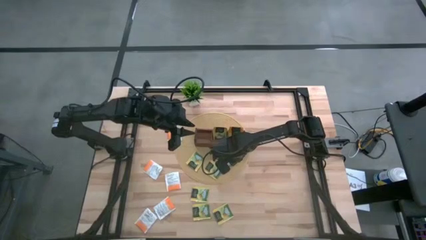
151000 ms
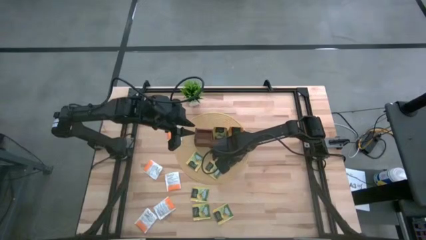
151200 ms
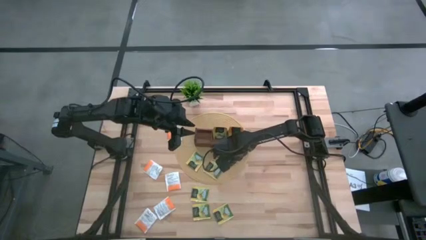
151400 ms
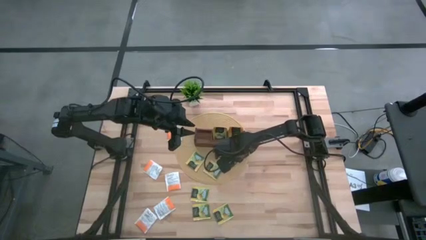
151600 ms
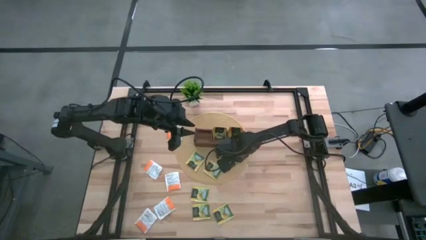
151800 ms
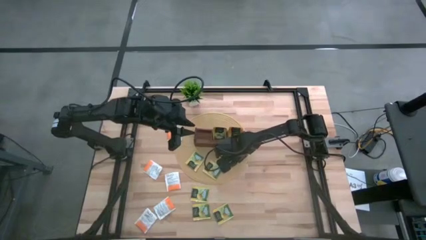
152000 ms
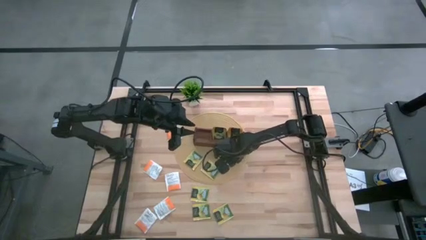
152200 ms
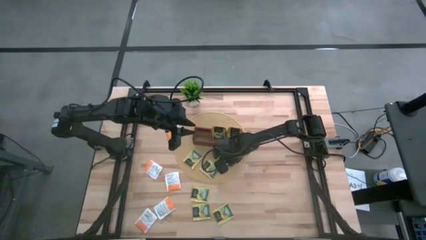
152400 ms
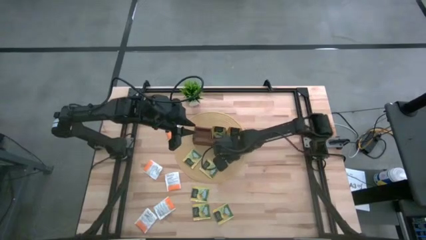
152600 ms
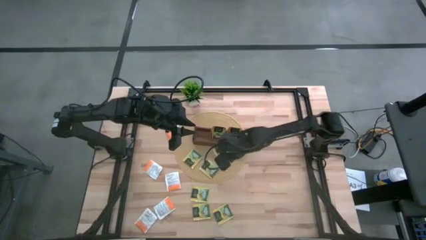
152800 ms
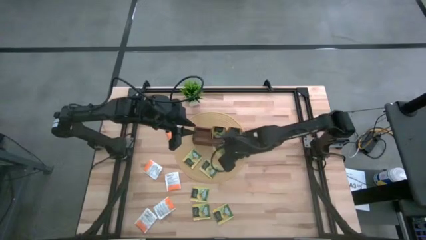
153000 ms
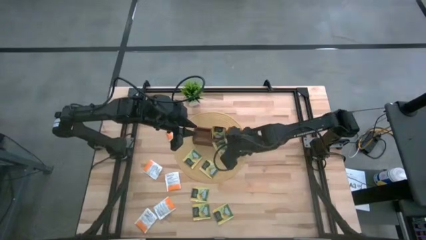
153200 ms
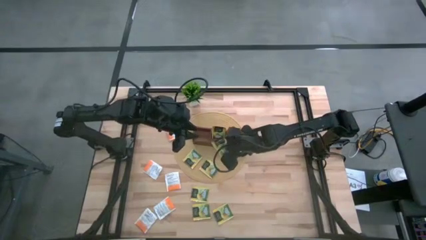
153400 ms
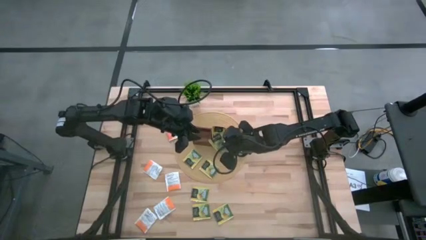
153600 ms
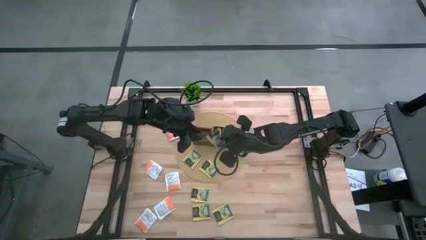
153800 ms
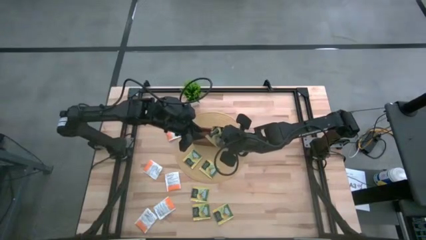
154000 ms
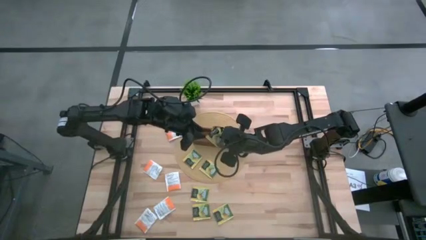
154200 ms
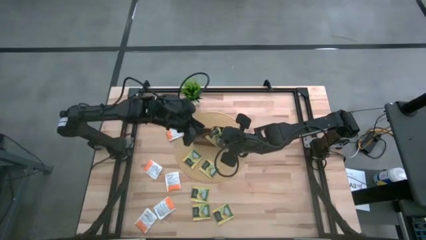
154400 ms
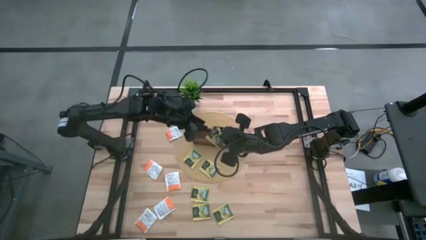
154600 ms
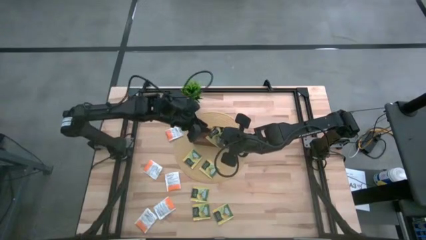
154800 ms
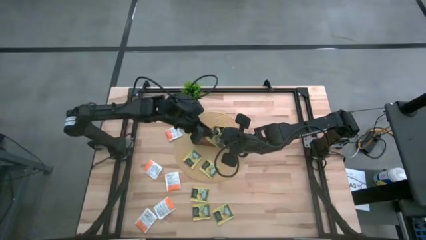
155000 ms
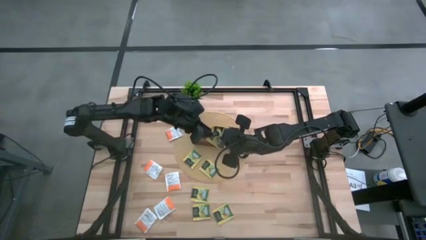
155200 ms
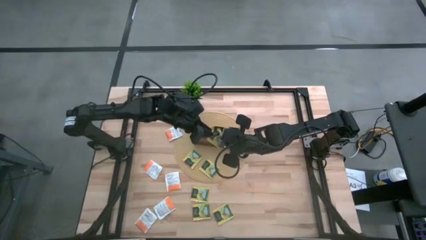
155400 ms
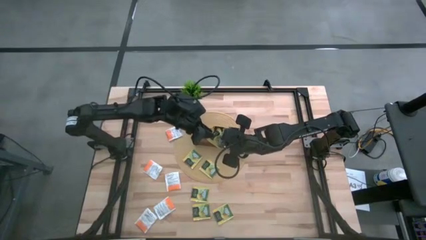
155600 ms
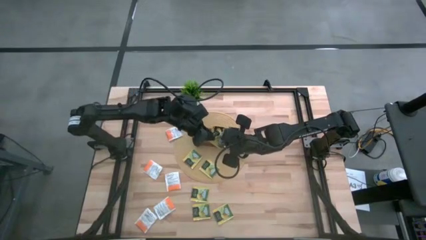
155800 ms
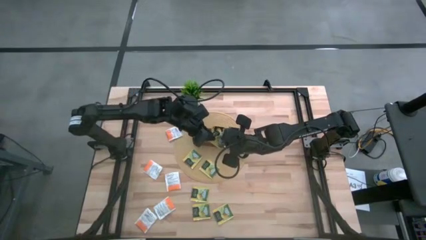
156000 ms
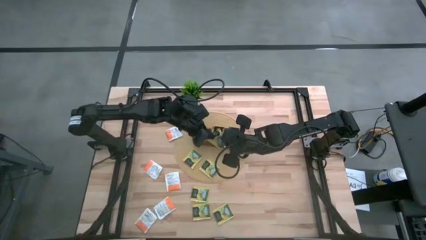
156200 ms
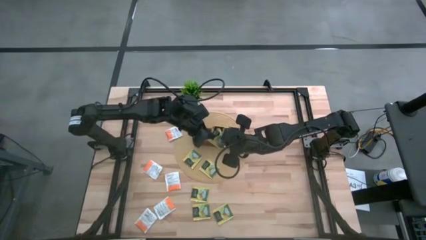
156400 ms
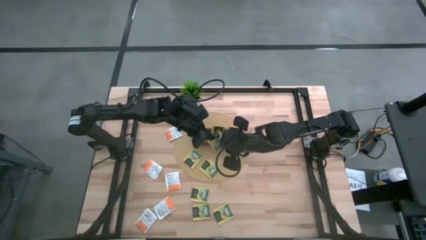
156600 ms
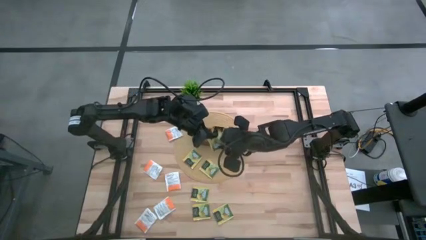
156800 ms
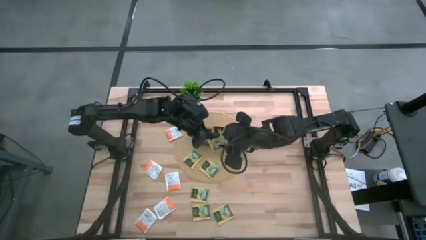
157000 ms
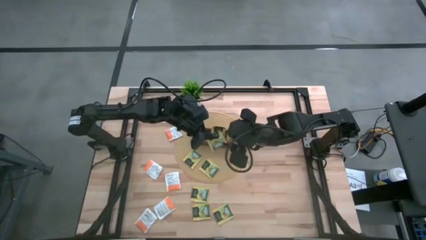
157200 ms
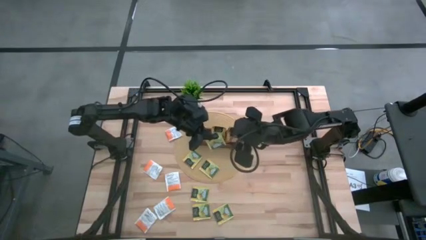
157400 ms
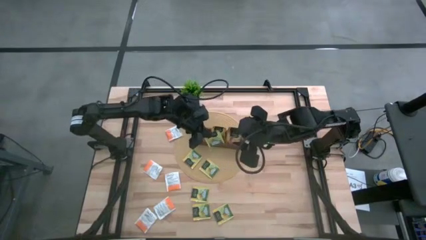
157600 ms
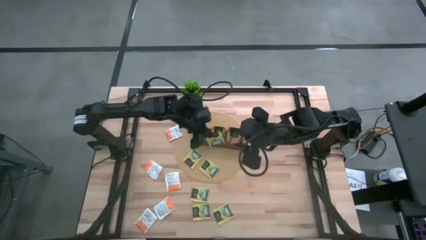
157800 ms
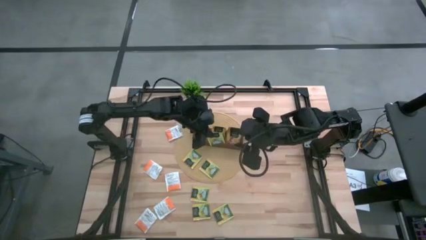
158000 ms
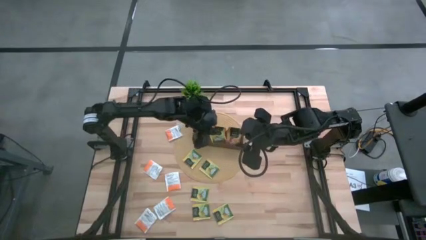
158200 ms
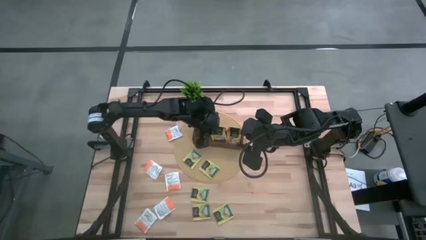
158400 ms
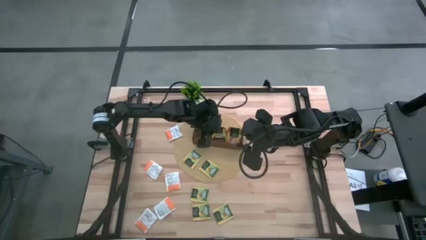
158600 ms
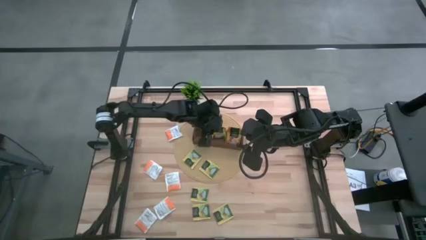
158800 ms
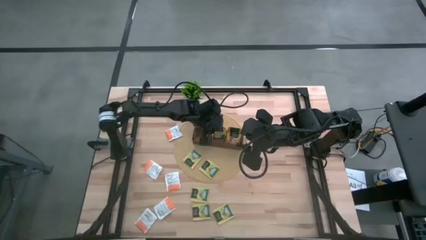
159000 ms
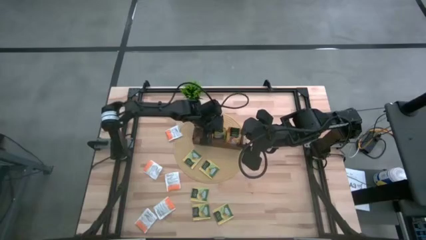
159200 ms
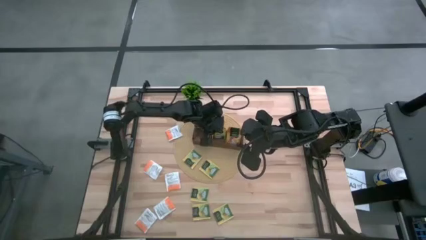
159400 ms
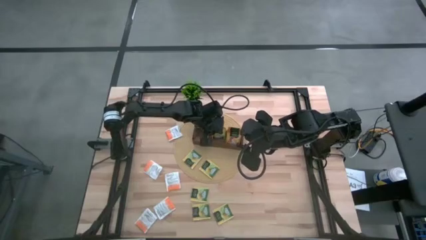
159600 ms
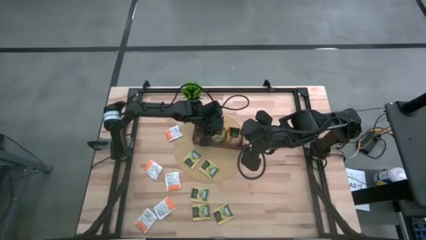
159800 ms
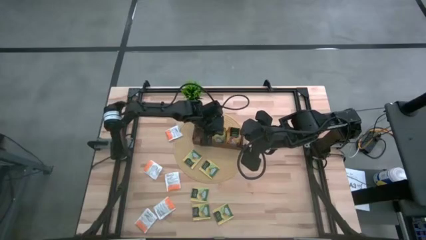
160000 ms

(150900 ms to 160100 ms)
Task: Pick & Place Tea
Put the yellow tea bag into the middle section of the wooden organizer

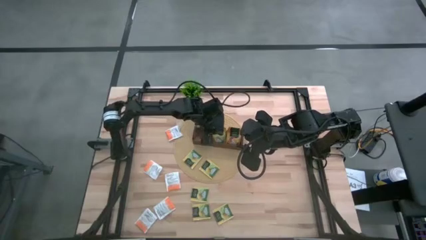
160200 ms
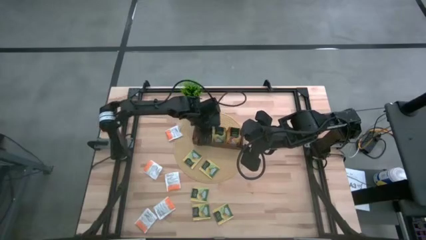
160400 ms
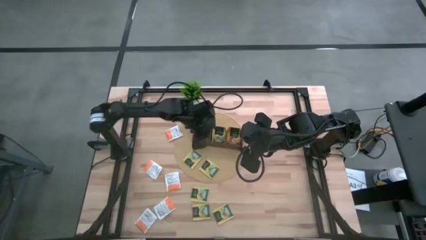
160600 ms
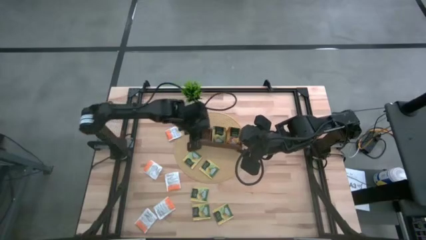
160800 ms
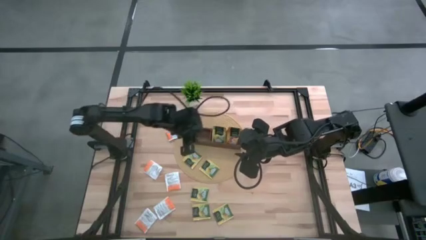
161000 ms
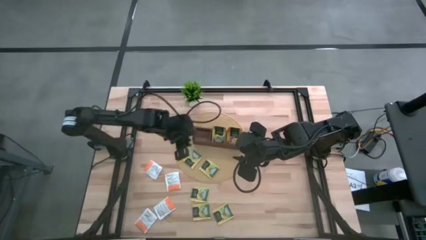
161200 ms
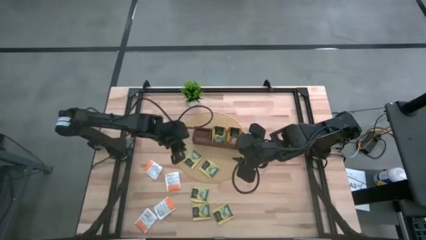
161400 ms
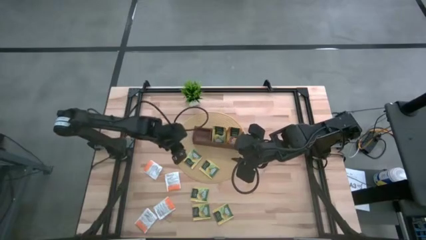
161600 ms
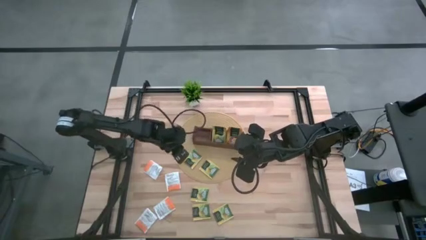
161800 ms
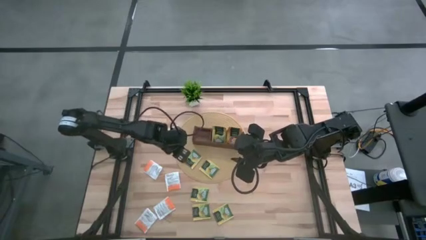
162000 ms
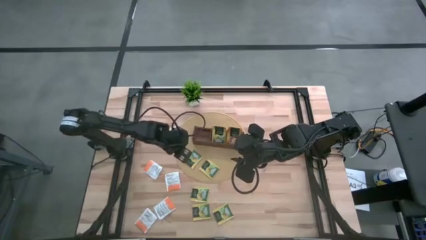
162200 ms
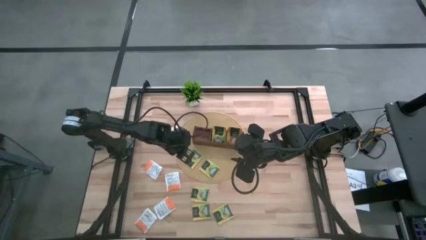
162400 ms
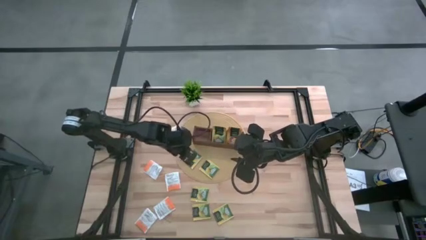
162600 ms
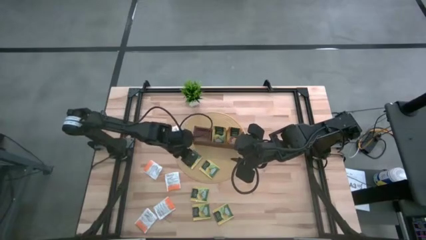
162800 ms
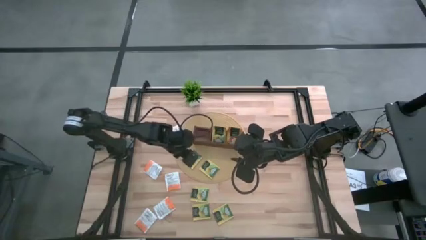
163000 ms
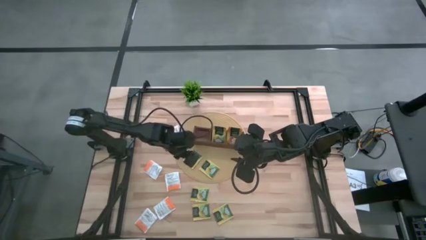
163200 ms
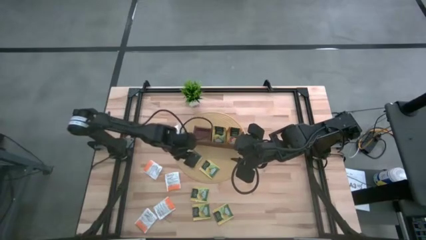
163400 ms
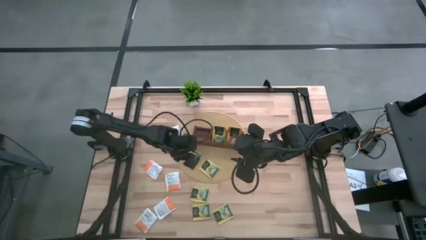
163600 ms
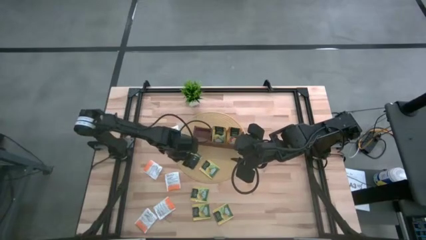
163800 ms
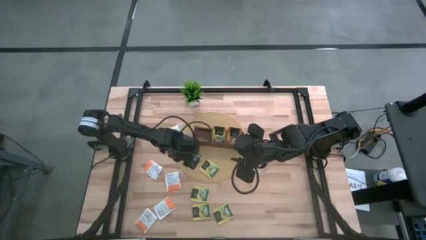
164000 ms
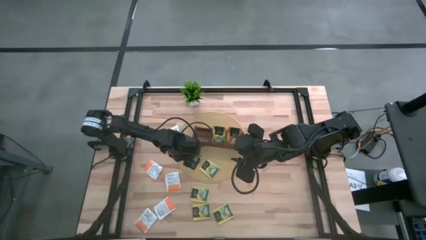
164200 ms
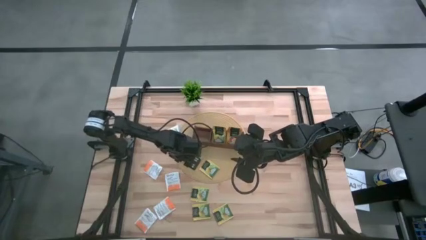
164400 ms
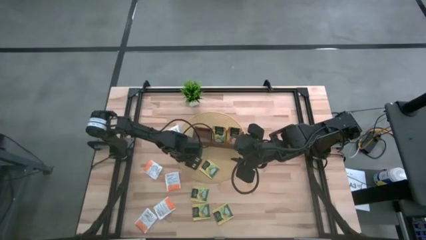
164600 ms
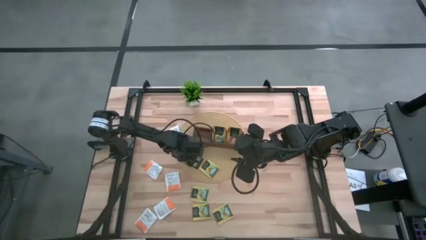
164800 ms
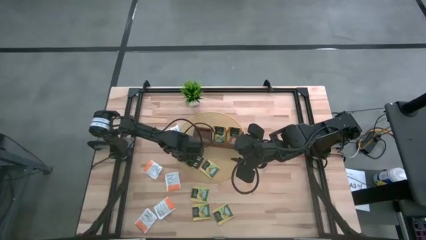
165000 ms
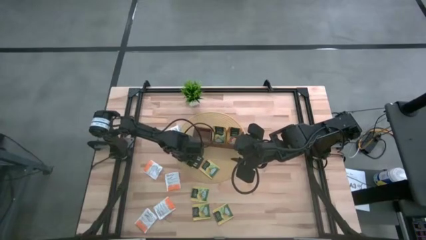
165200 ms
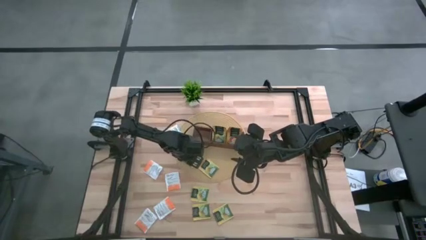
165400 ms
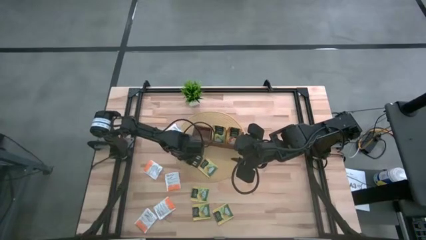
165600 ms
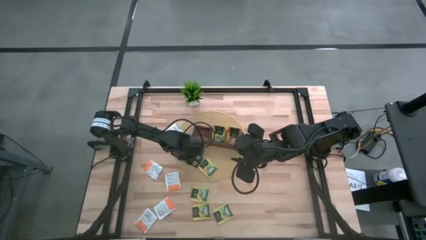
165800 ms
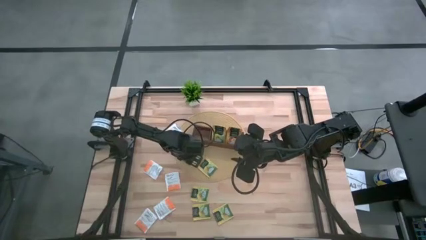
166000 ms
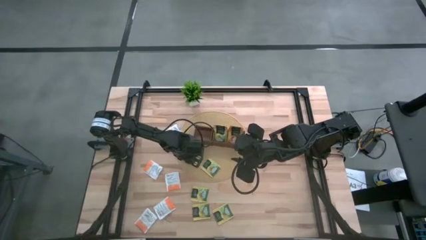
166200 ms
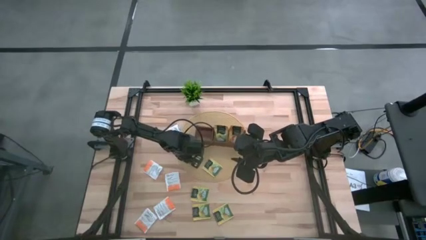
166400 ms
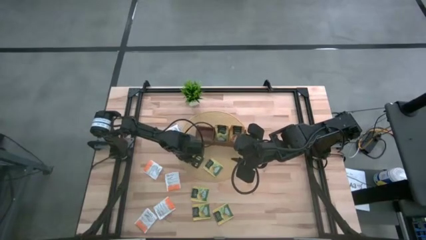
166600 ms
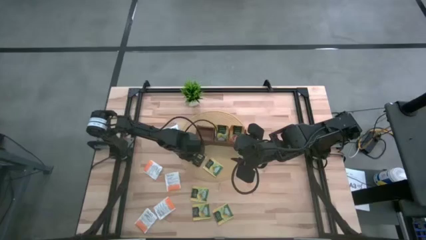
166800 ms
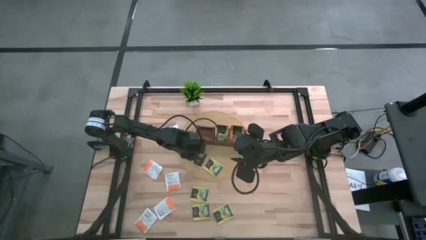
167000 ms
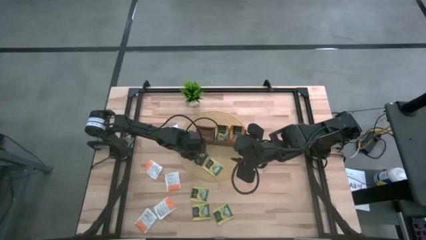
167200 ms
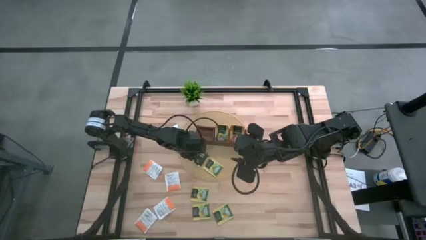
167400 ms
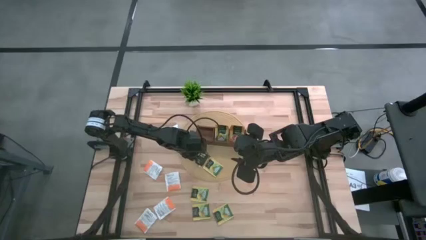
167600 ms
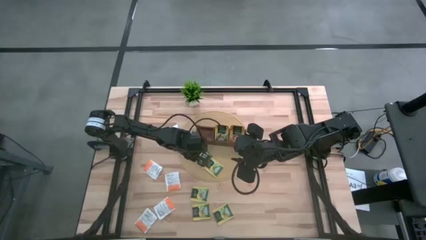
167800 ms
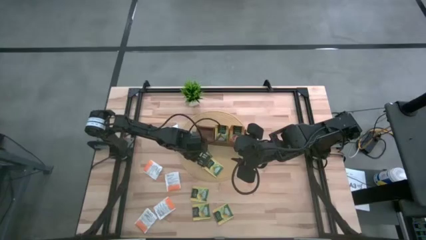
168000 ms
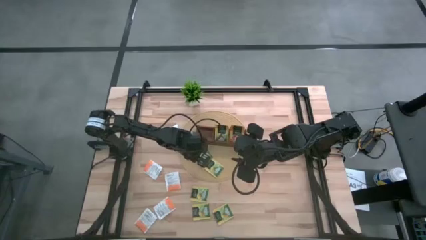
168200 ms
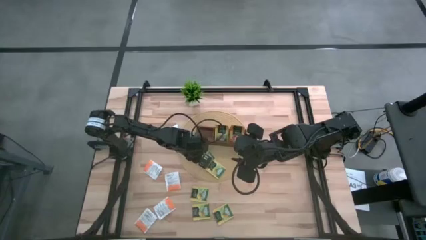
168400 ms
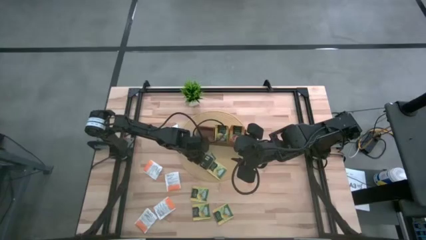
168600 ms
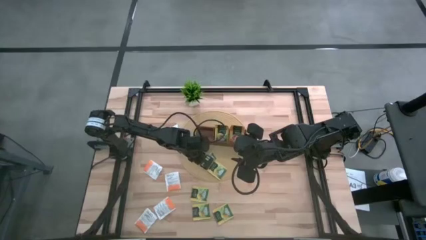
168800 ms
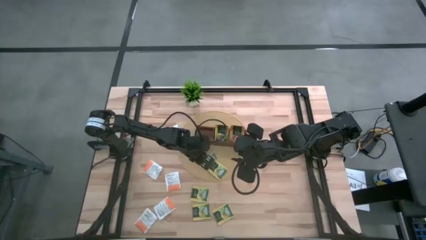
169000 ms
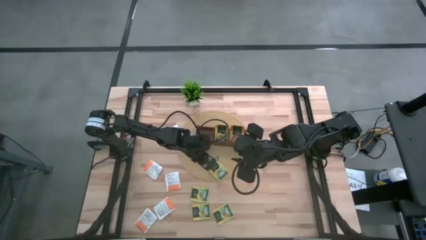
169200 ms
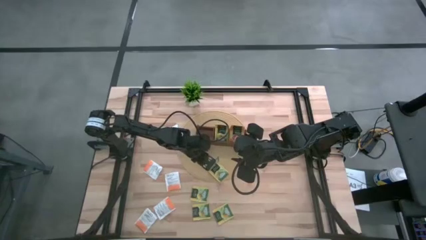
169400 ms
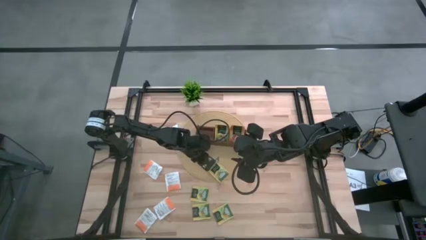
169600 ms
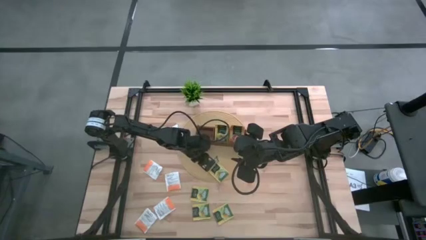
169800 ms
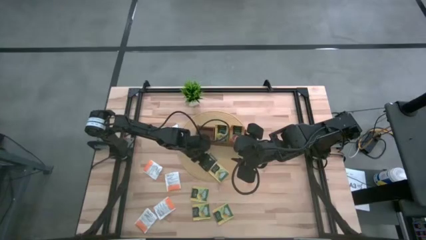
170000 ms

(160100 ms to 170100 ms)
Put the yellow tea bag into the middle section of the wooden organizer
